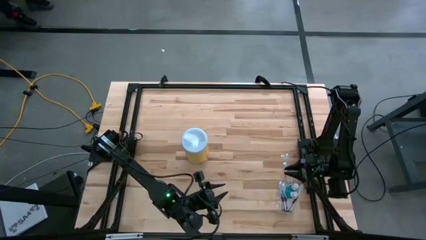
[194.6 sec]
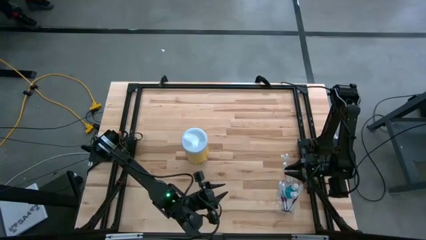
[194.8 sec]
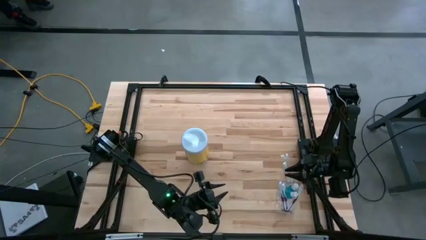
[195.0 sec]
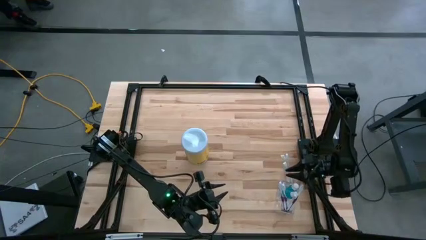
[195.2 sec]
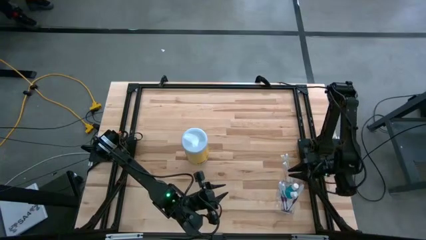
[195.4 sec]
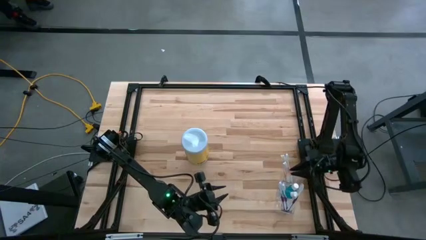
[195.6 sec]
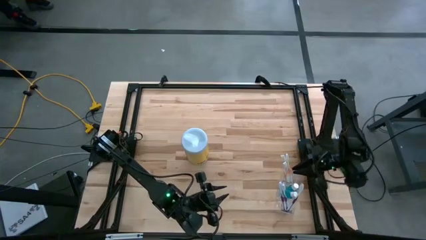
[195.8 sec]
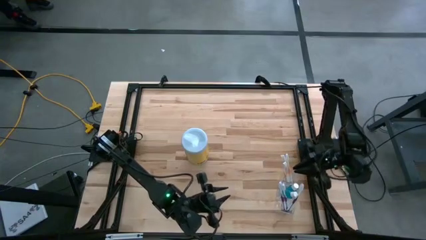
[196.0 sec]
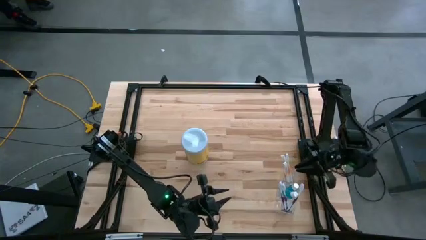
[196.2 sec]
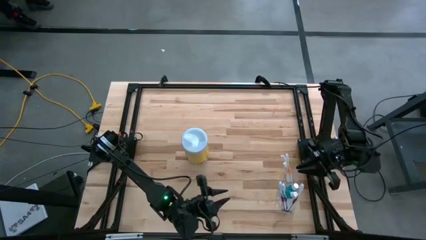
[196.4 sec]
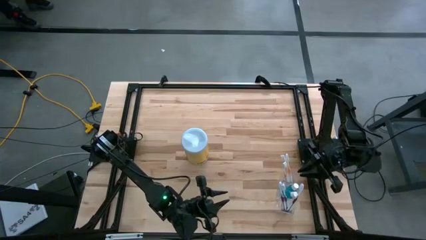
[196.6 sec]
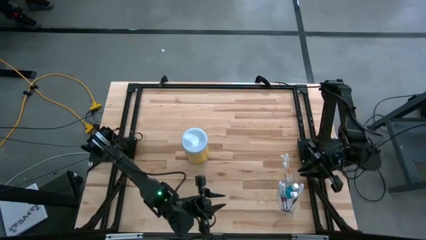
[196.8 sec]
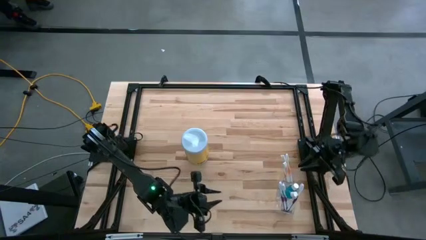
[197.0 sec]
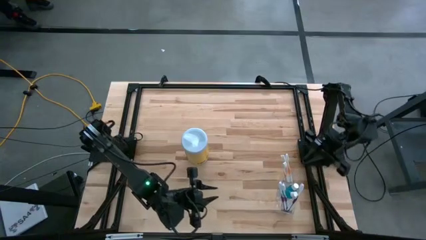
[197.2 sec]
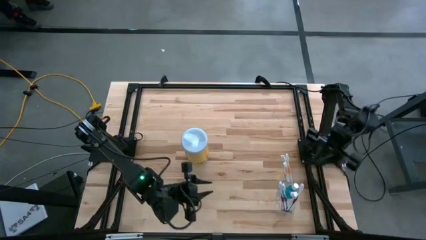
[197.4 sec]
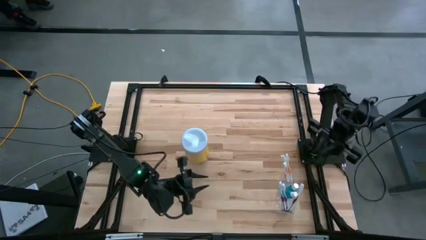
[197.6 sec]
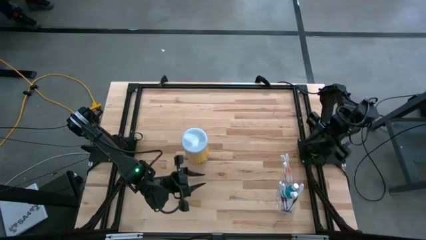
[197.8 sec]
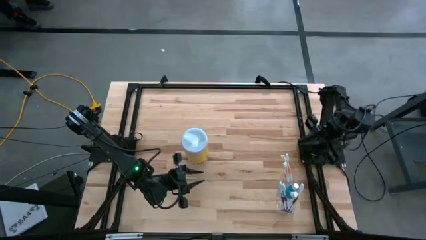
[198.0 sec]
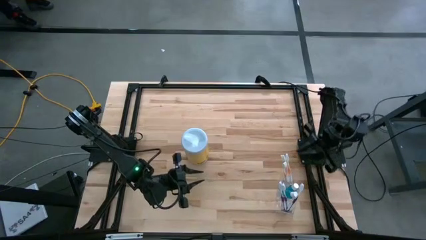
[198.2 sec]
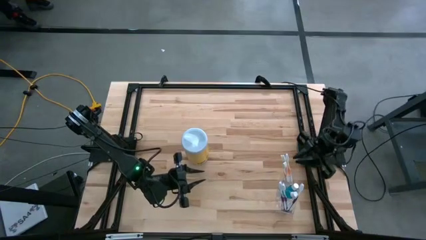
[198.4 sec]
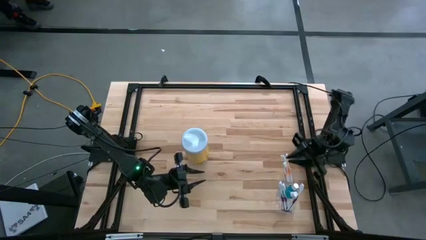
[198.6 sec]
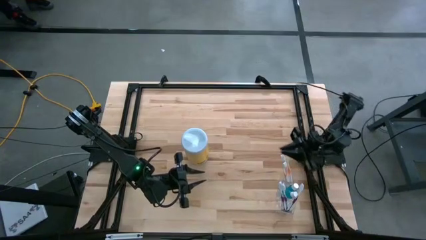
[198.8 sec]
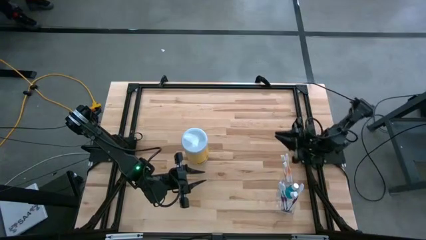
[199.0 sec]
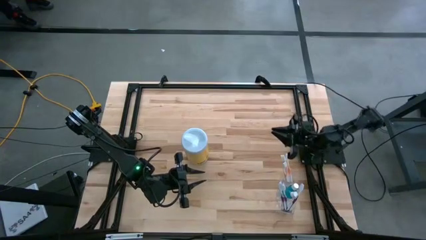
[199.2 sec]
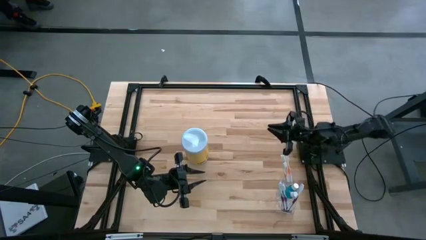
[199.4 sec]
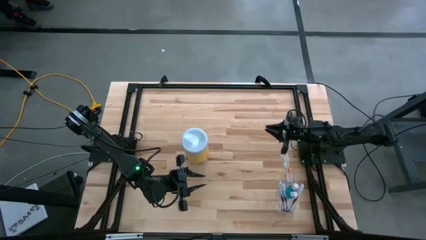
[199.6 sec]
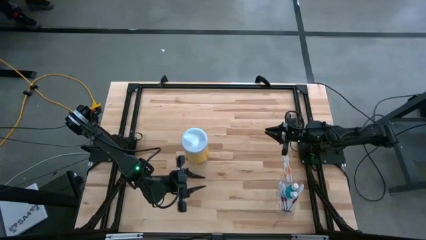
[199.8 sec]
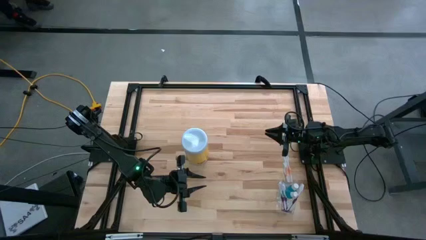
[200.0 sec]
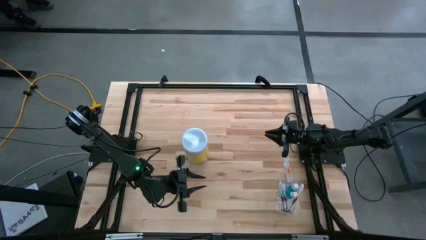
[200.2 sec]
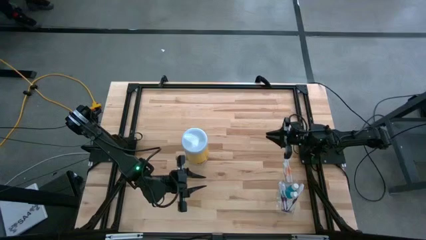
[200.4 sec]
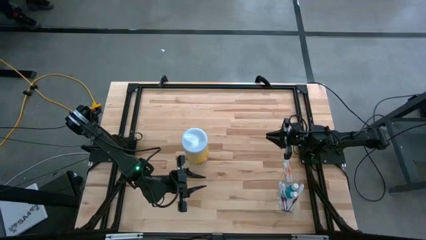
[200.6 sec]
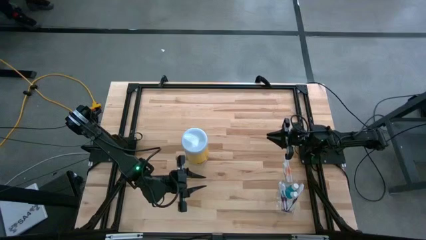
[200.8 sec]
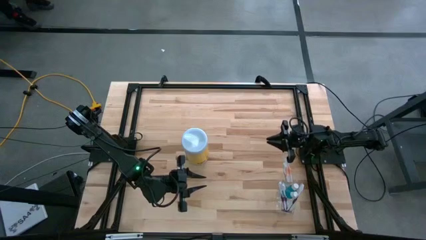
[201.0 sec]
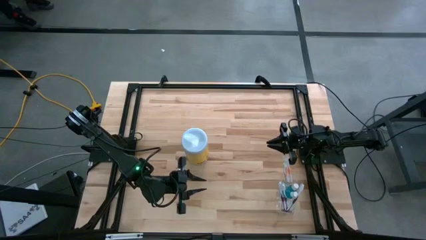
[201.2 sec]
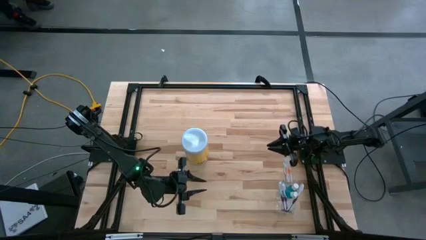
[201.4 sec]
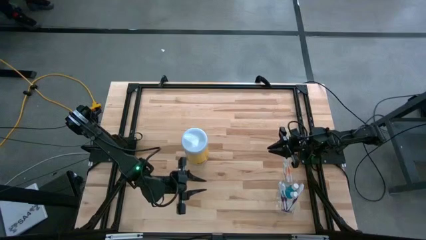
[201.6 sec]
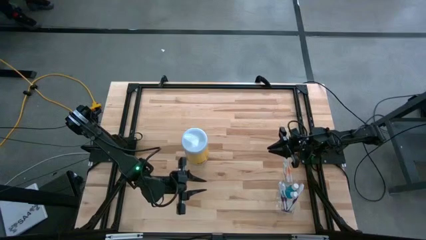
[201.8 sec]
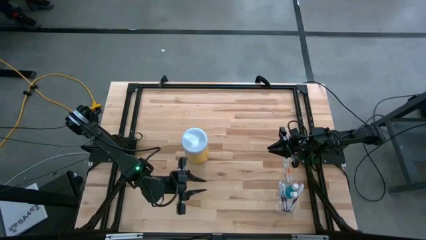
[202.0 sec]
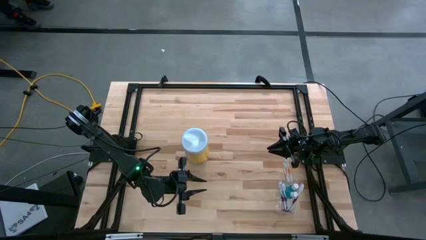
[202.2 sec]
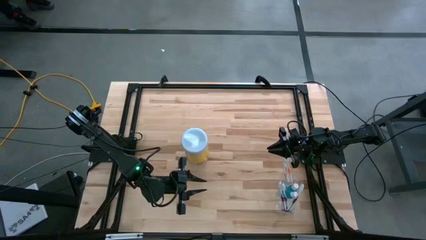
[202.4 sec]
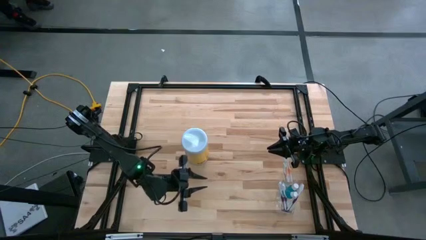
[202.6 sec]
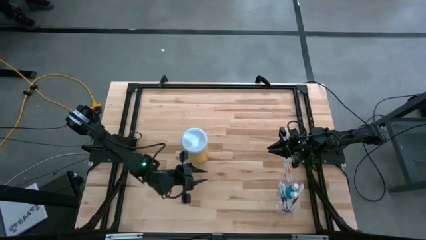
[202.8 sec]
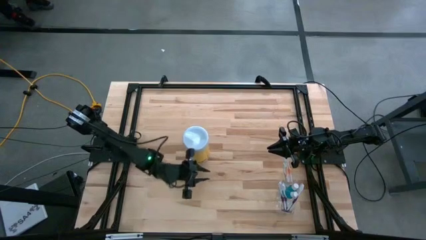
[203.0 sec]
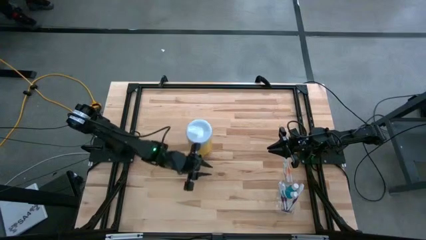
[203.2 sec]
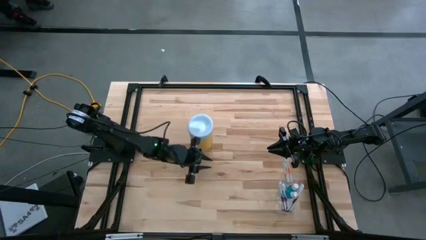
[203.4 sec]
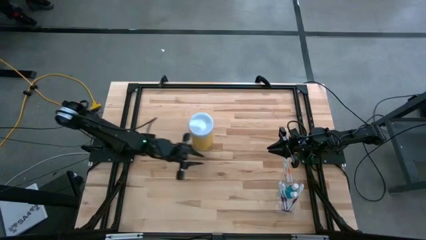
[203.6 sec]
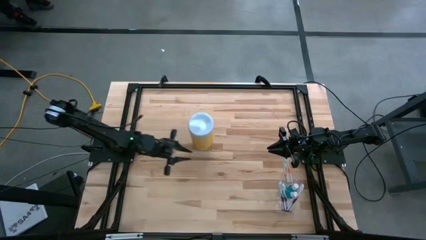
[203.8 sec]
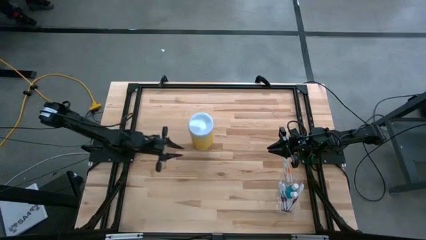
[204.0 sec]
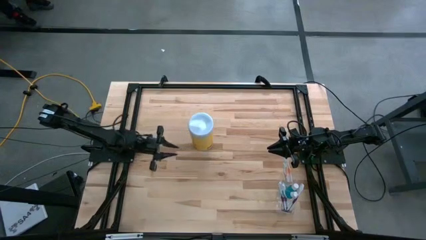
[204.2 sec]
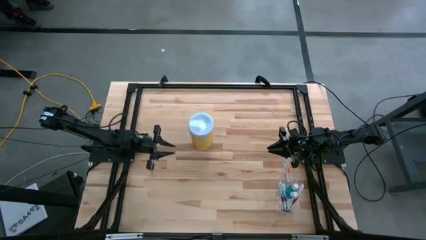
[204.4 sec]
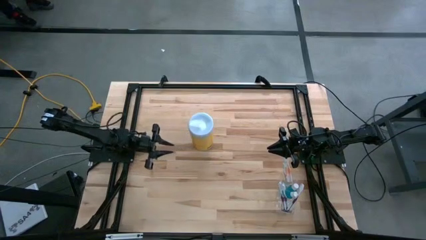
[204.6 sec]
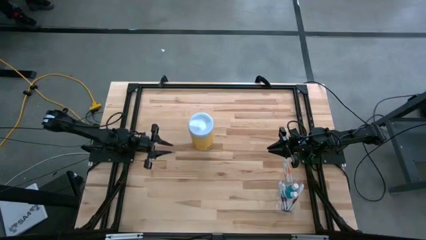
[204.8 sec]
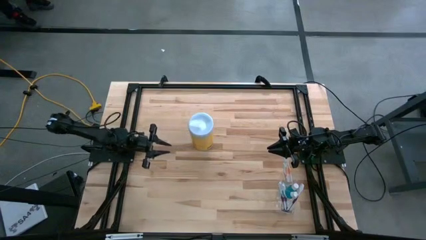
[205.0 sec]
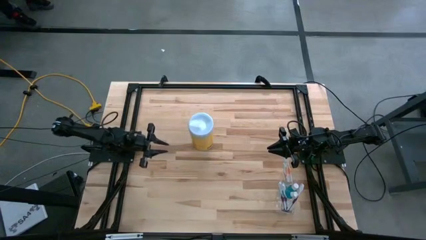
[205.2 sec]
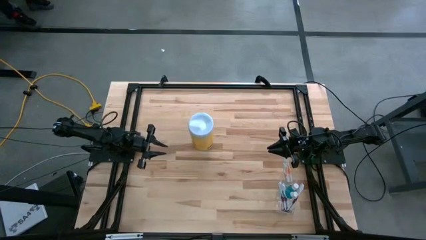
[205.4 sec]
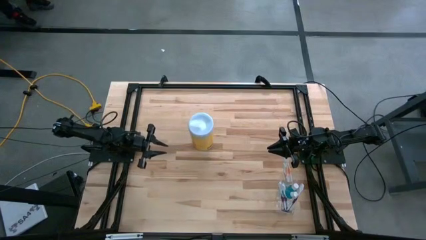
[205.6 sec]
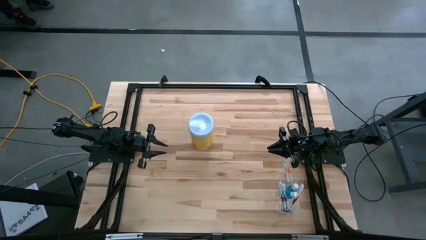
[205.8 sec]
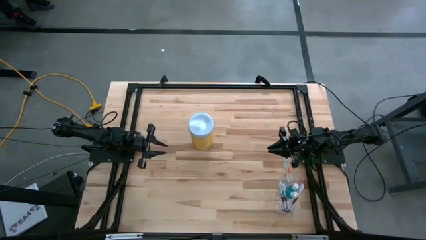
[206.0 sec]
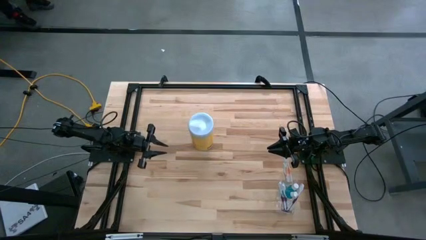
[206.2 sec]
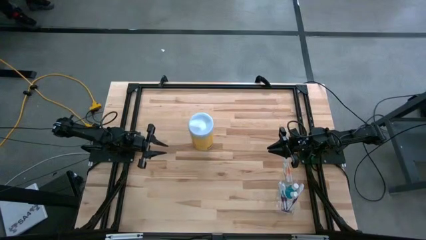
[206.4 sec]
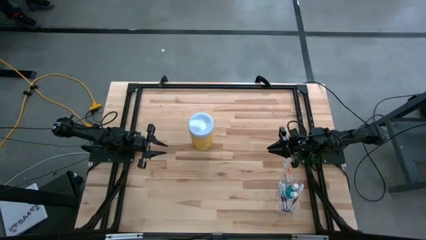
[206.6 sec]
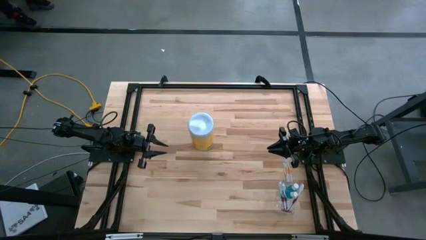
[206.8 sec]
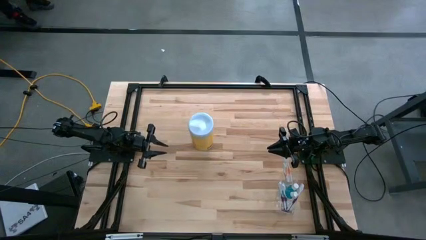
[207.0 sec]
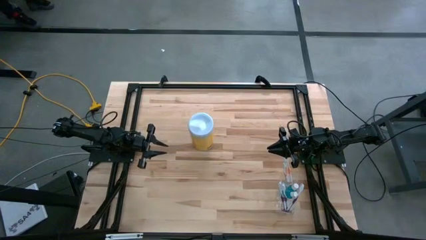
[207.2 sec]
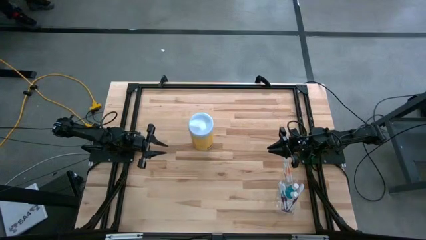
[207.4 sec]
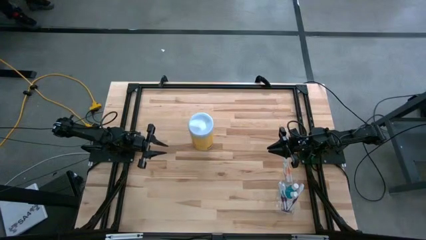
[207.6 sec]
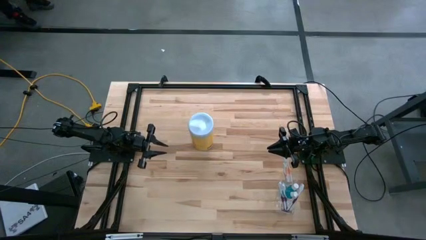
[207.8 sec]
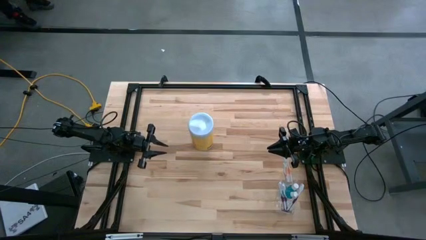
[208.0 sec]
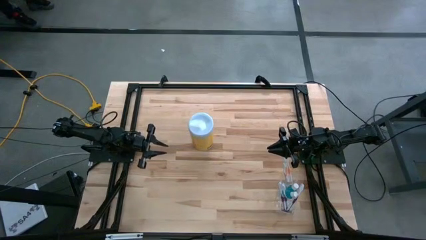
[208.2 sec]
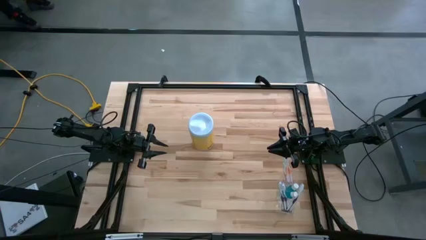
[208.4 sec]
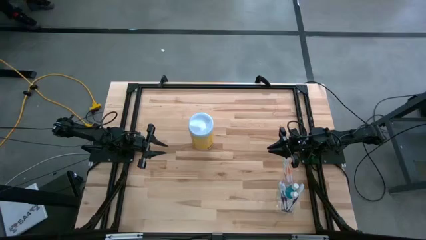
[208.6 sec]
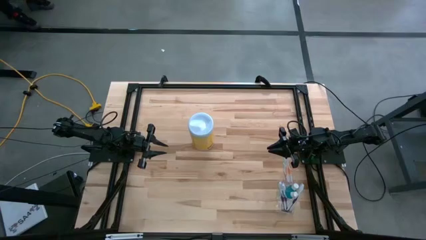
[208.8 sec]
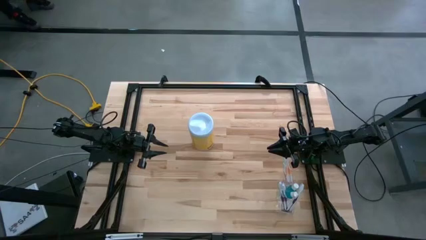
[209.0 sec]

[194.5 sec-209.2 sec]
Task: Pick & Place toothbrushing station
Return to Home Position

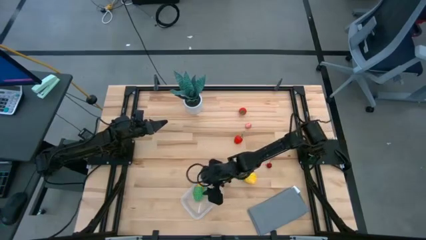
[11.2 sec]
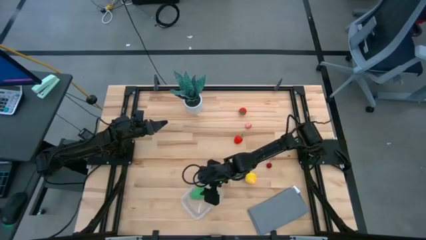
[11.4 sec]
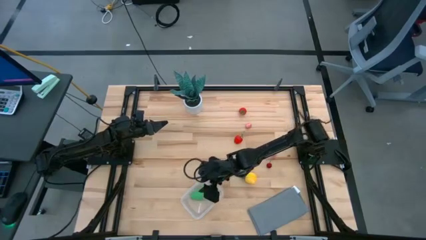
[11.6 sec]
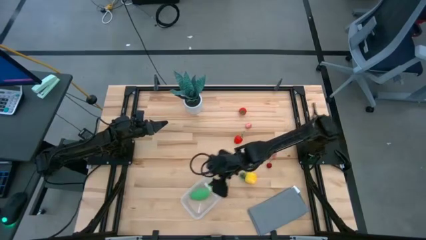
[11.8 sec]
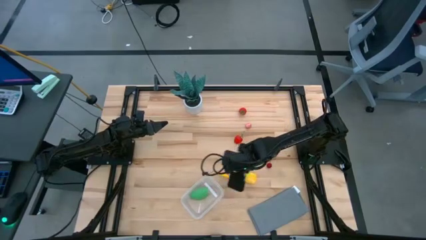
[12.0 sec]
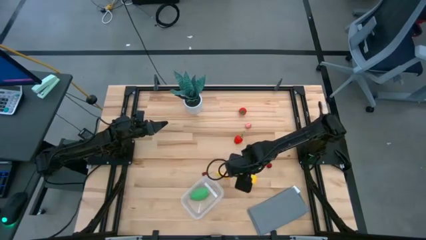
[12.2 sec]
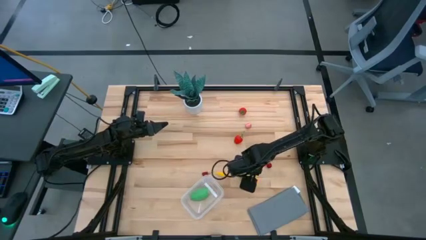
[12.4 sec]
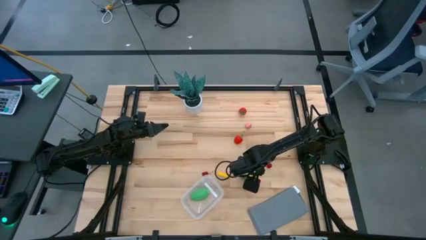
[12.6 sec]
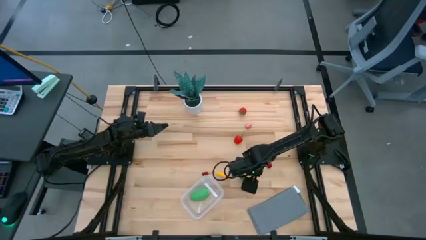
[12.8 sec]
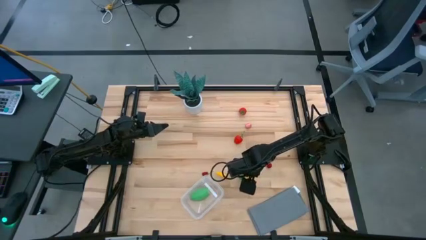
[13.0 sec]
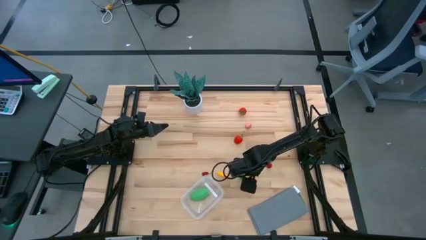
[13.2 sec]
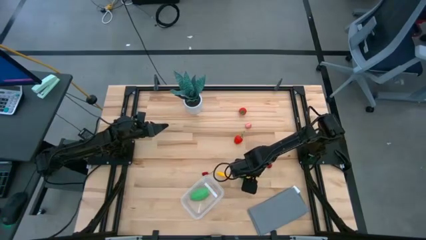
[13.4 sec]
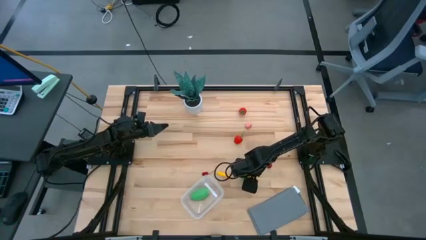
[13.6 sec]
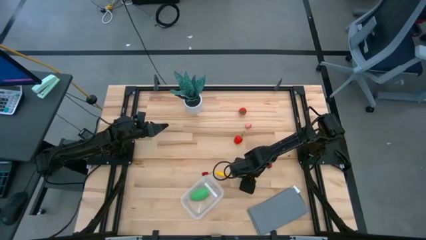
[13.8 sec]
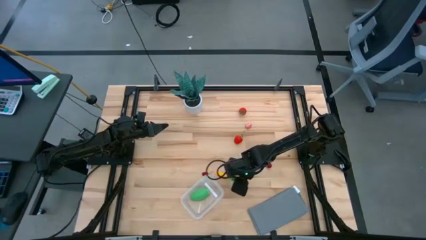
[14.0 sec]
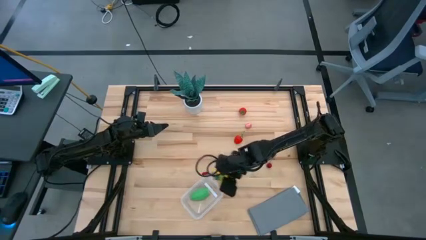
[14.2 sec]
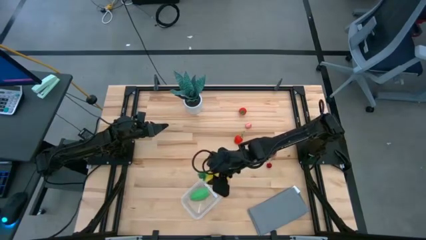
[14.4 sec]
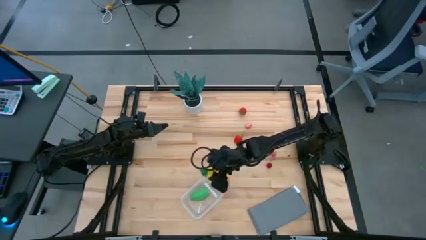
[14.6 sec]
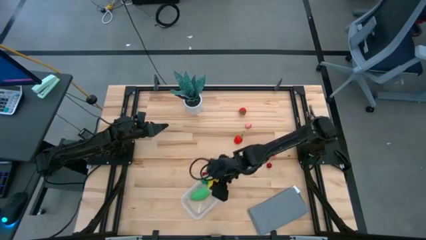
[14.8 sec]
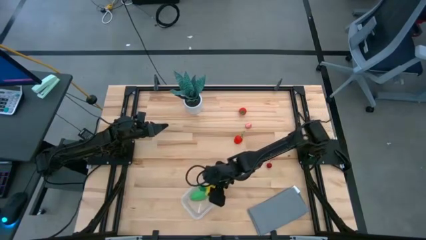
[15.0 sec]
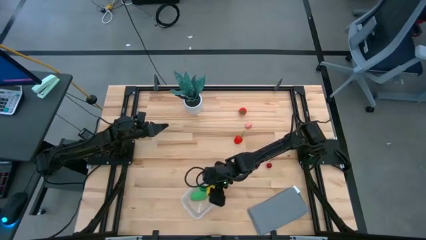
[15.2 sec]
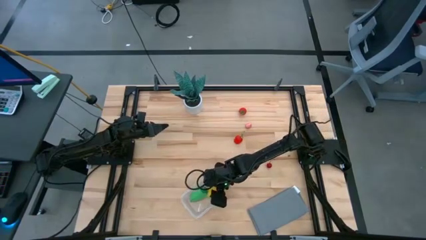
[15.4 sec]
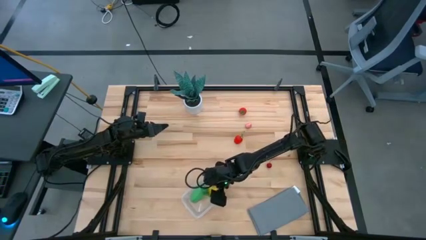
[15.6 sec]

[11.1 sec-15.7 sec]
Task: Pick and placing Produce into tupperware
Put the yellow pineapple into the transparent bin
